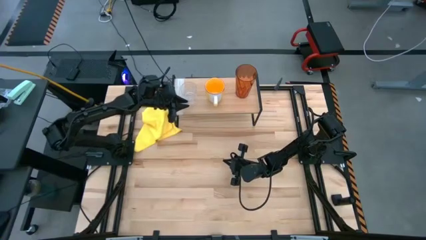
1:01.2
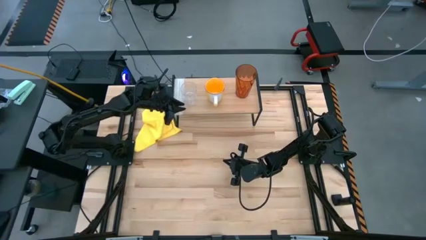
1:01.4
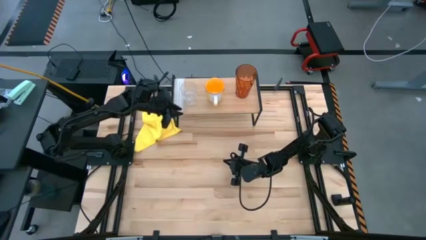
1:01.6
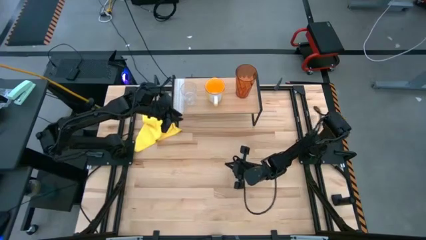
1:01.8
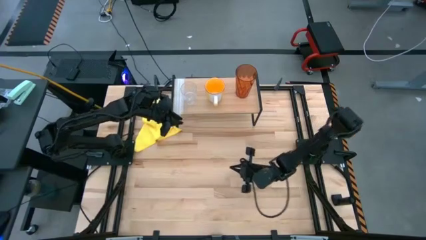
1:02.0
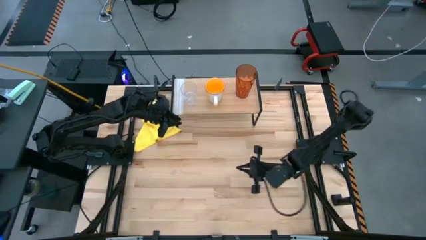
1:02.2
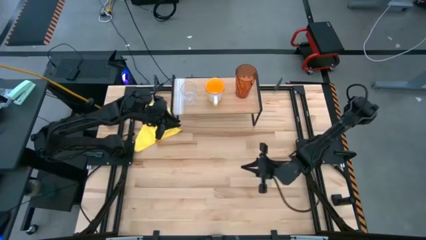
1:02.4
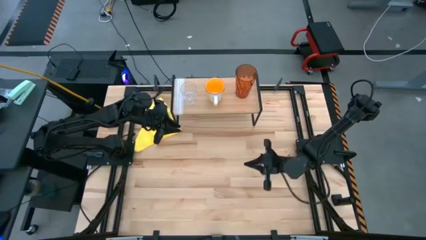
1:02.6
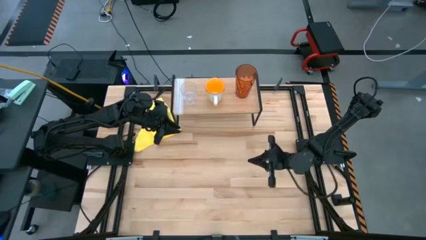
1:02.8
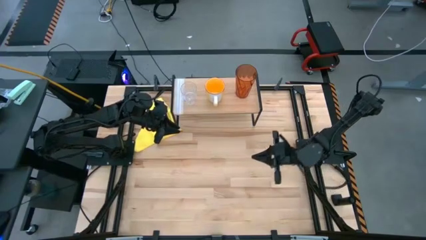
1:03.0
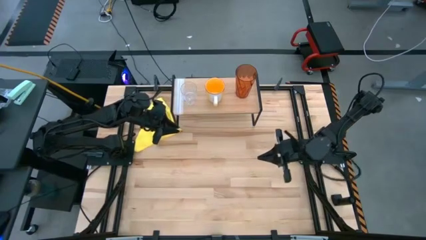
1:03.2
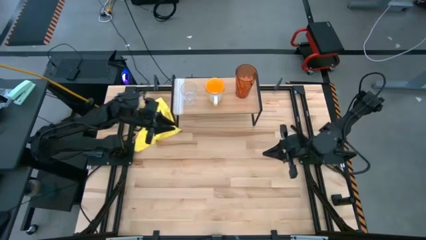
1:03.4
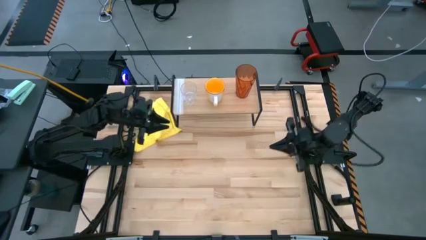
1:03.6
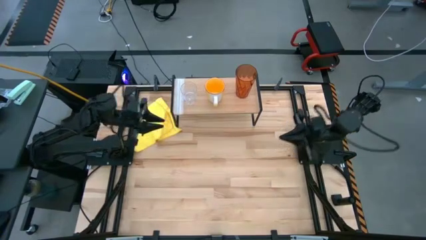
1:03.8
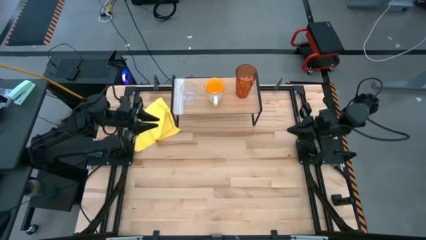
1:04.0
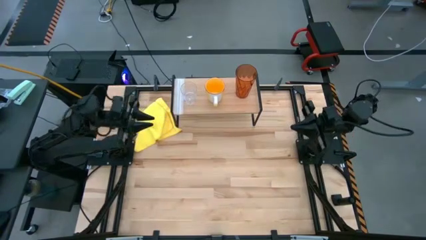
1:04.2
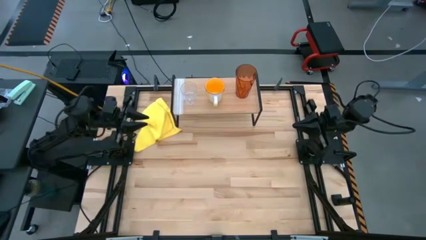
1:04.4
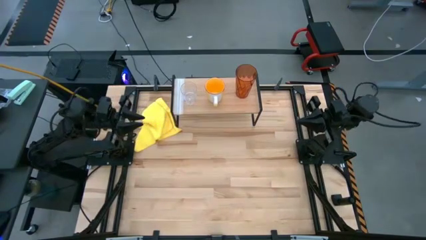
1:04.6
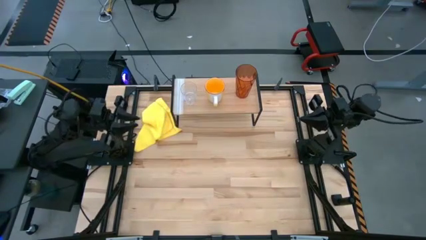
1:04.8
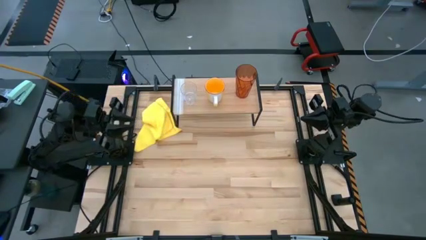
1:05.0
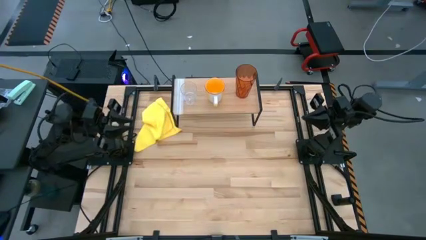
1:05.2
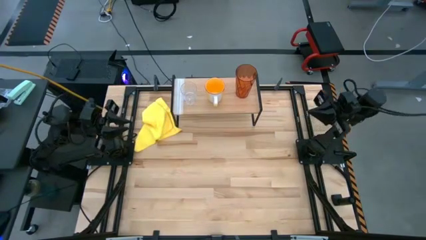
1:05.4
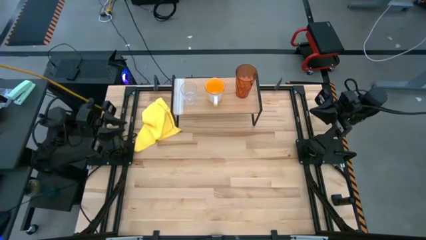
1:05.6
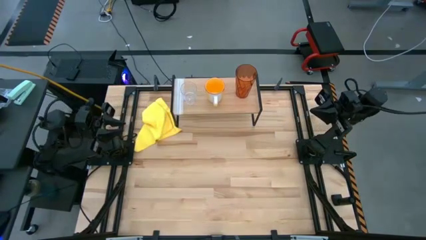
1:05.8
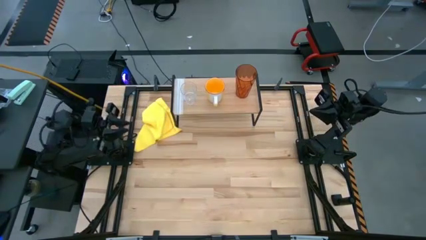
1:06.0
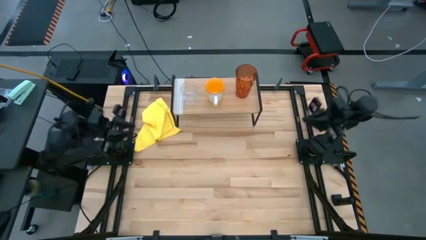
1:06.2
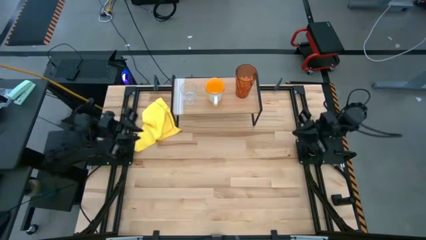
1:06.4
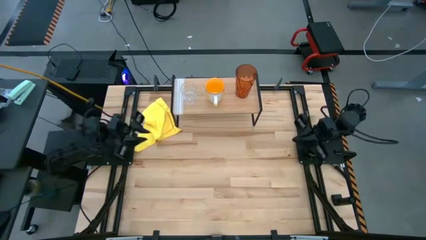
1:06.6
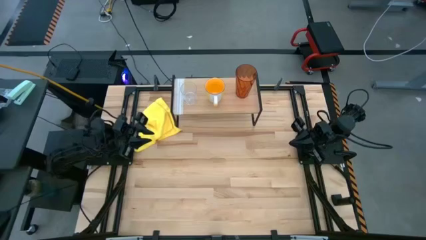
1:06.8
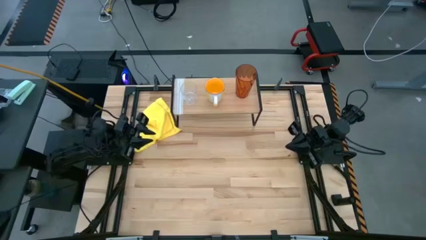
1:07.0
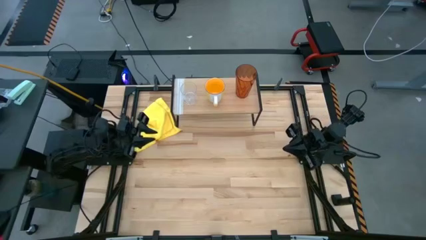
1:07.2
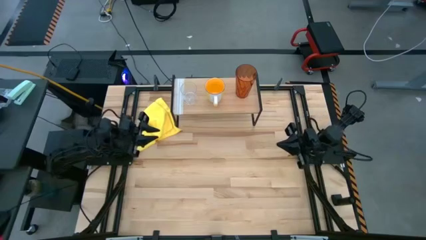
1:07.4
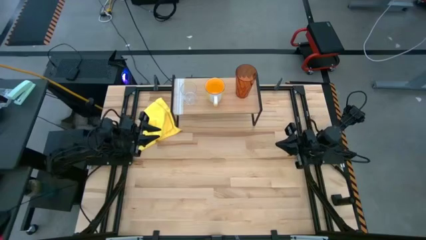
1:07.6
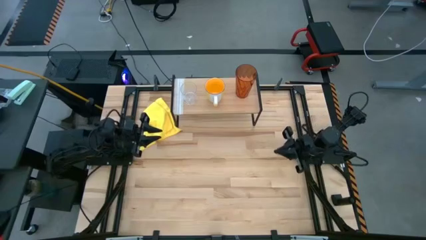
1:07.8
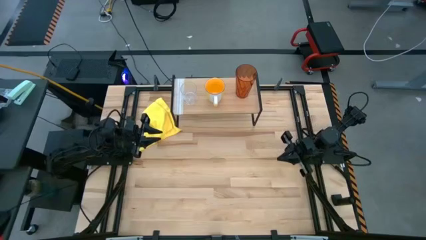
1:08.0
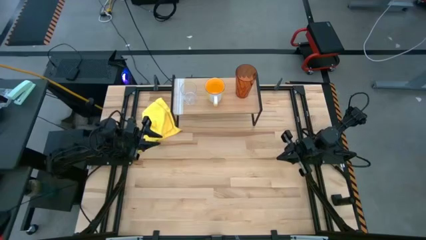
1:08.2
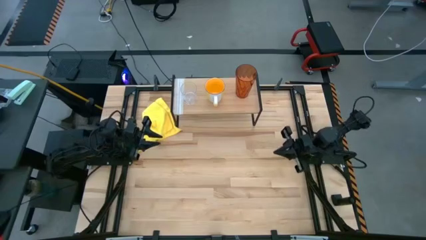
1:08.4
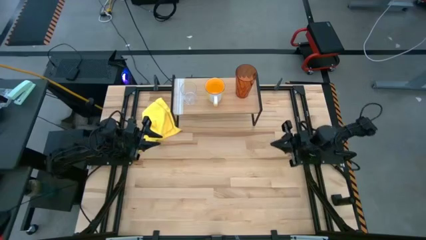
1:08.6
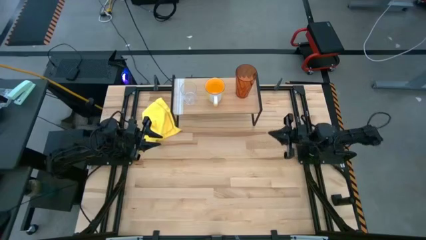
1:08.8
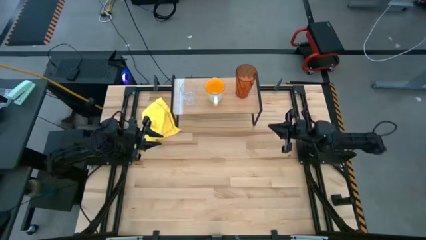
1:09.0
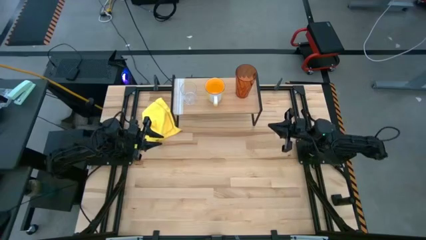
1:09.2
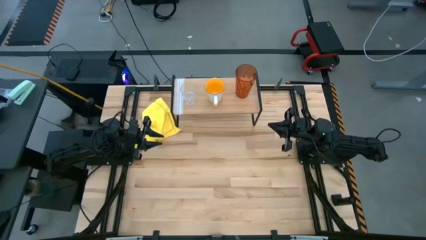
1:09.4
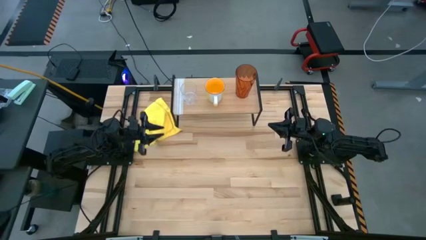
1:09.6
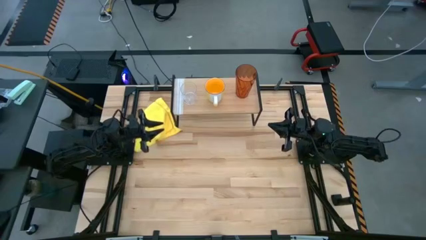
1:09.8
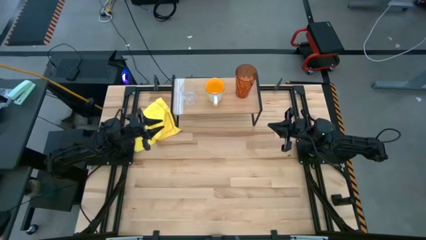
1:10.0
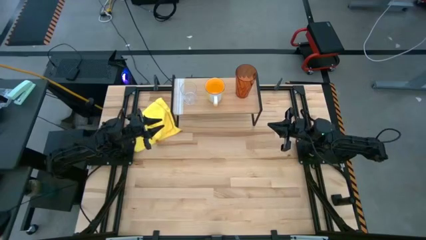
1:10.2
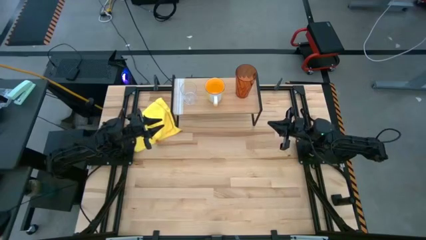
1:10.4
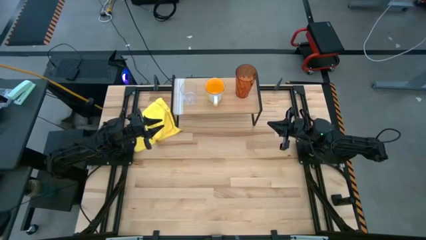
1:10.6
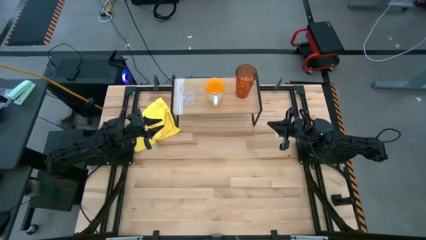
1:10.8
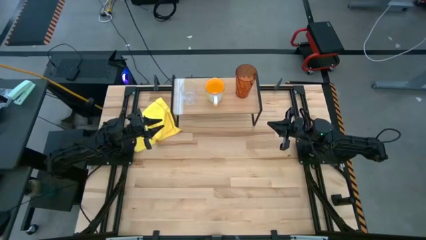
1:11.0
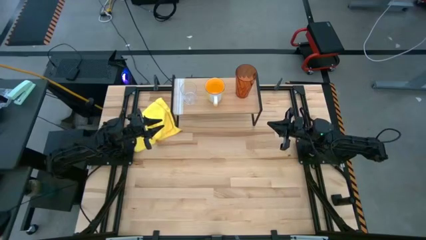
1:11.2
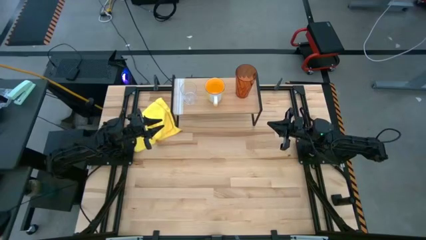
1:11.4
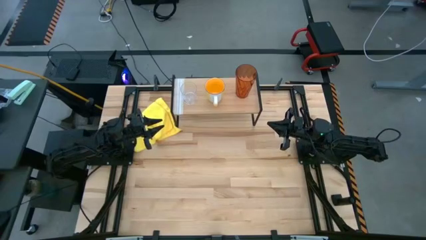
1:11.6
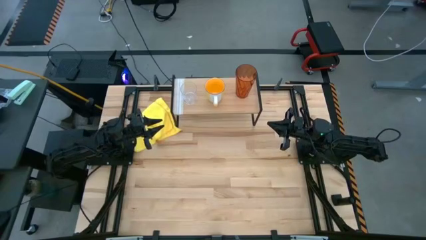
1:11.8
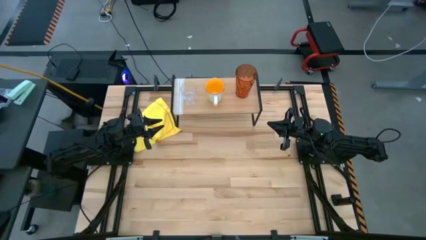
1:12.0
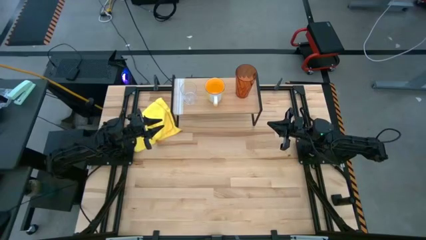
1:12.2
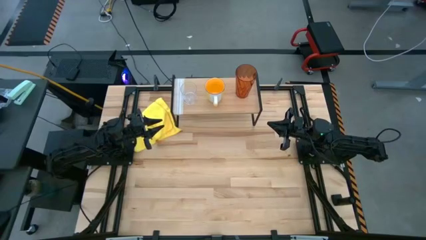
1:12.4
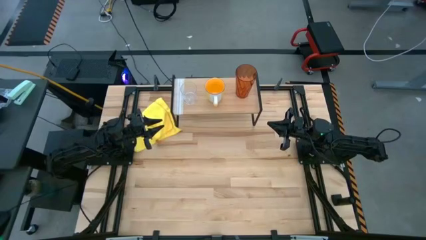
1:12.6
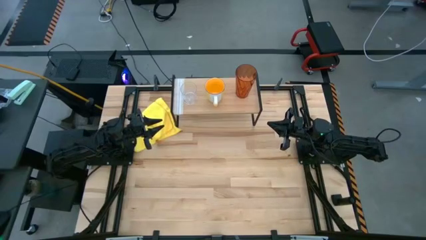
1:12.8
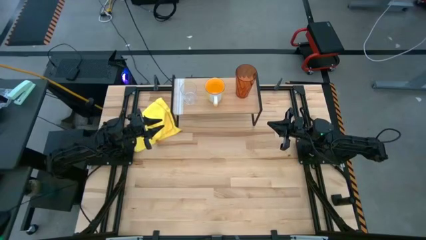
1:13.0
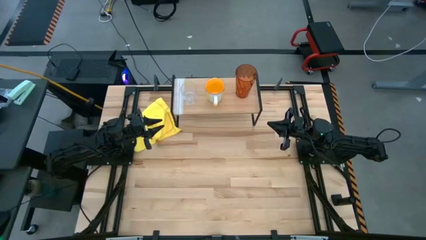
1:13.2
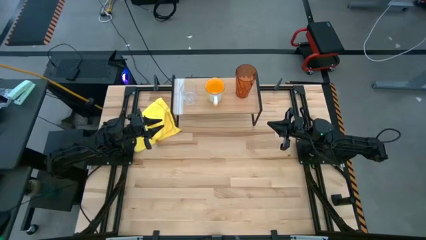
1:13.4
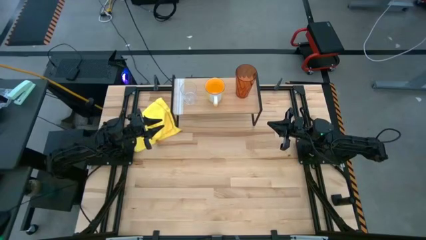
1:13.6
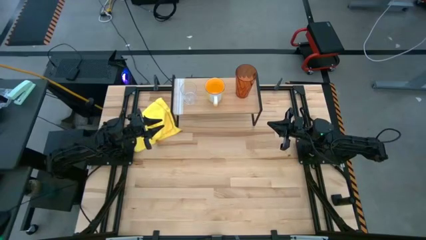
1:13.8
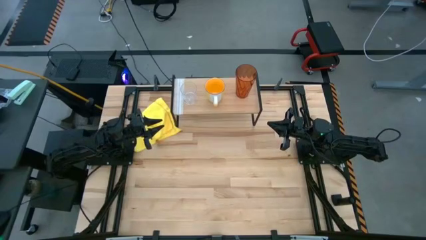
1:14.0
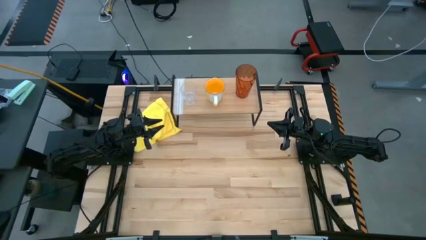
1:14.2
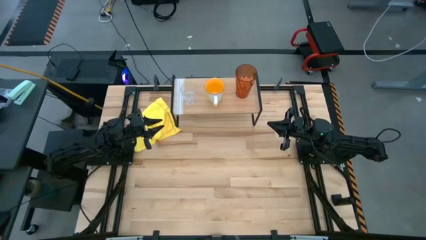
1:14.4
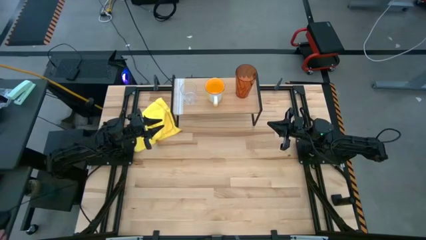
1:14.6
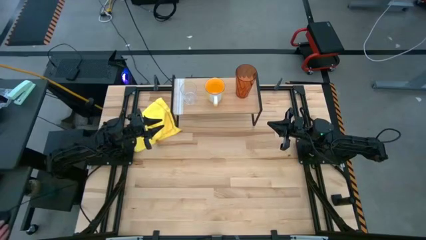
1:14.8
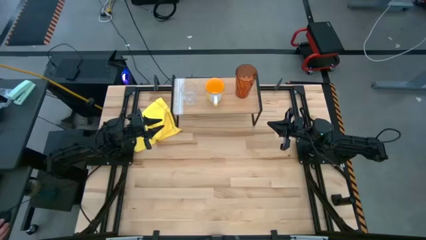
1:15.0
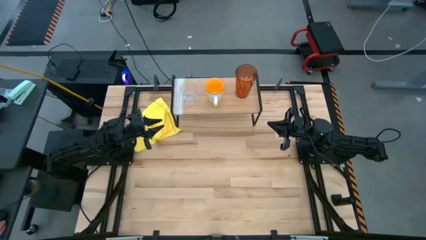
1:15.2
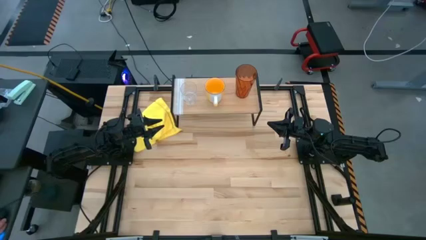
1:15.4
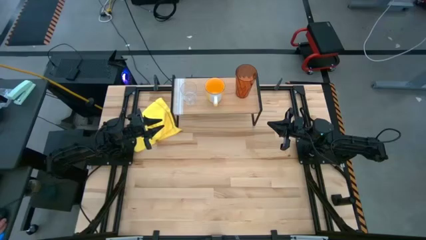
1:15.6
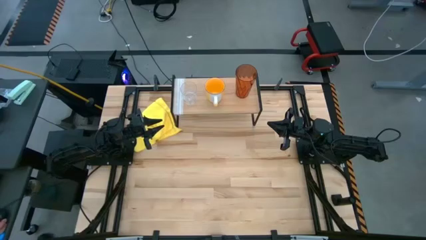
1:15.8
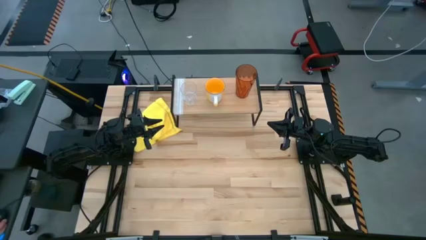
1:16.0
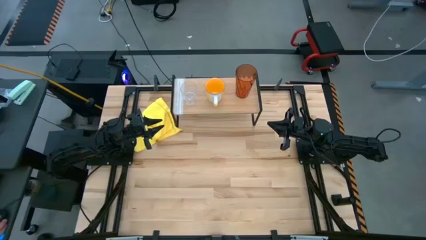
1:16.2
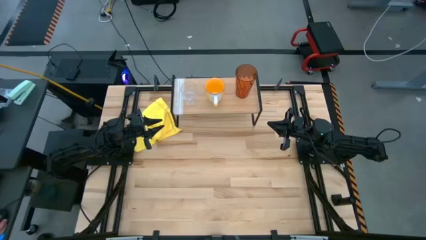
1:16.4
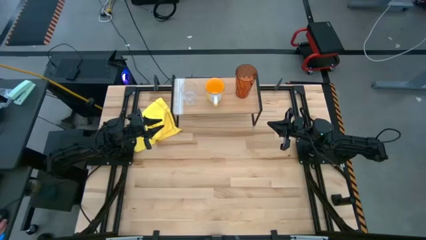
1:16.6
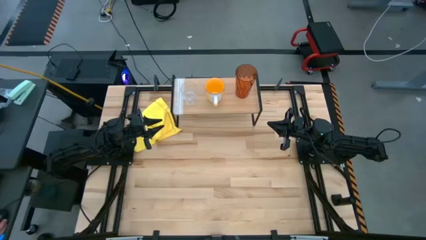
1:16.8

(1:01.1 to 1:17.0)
Task: Stack small to large cups/mugs on shelf
Return to Home Position

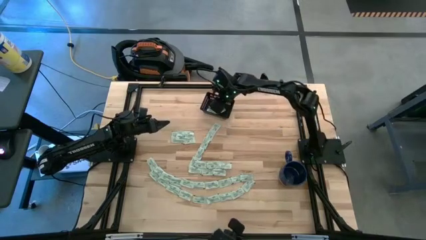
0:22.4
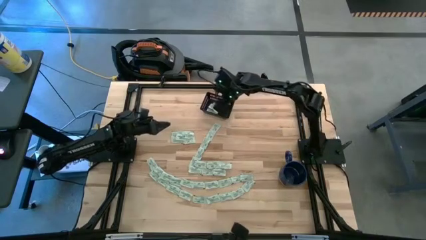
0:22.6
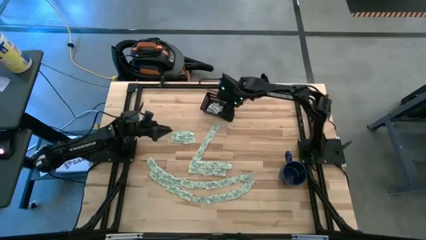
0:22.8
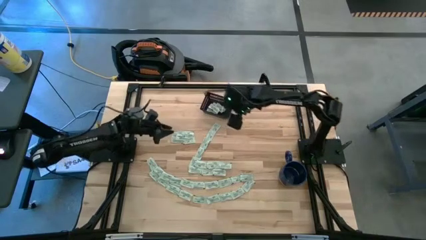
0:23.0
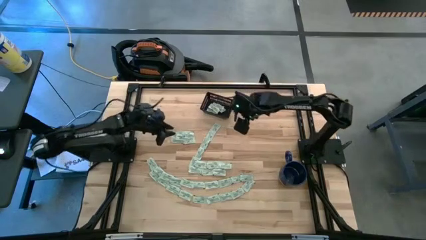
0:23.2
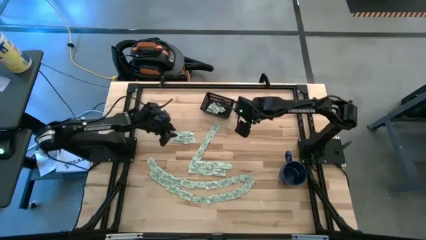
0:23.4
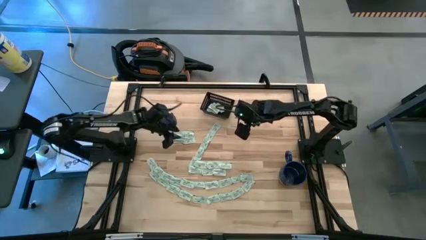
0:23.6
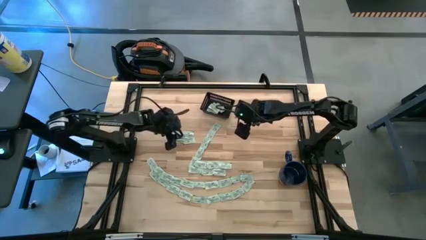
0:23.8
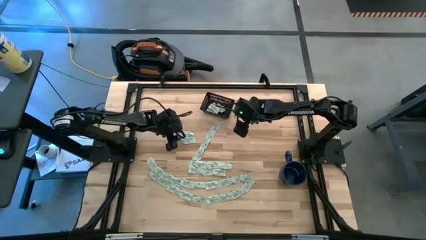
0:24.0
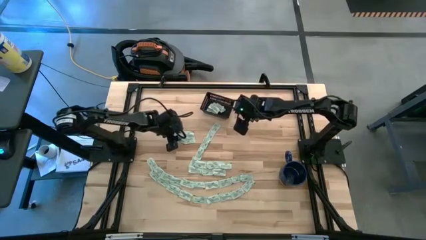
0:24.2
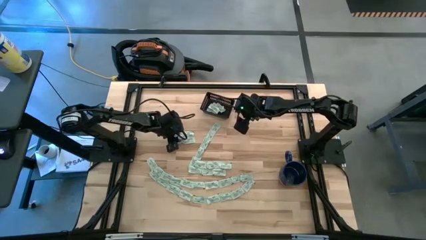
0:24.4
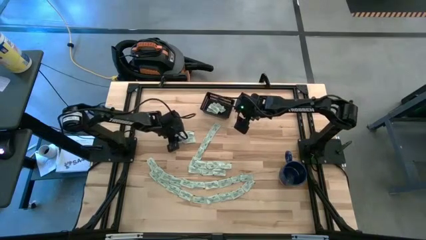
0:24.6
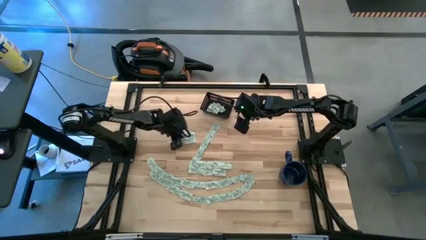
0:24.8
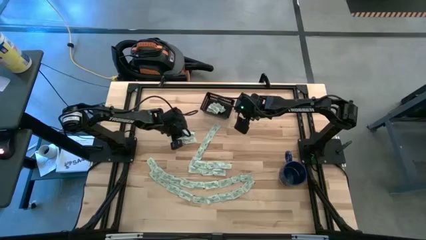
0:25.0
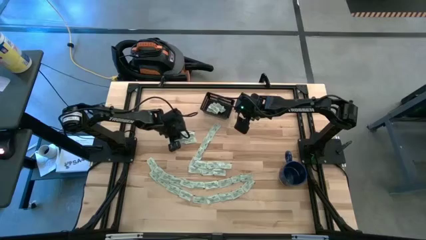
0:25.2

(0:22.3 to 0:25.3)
Task: Pick and place Stevia / Truvia into bins
Put the stevia packet into the black bin
